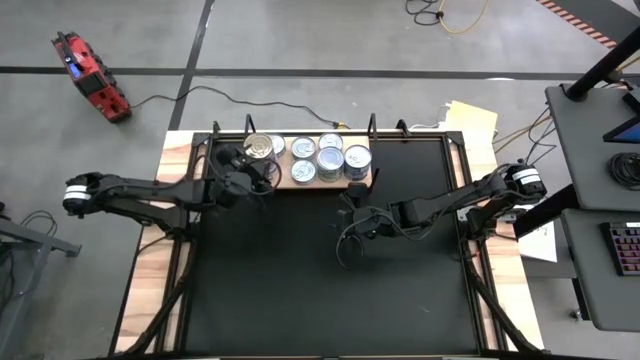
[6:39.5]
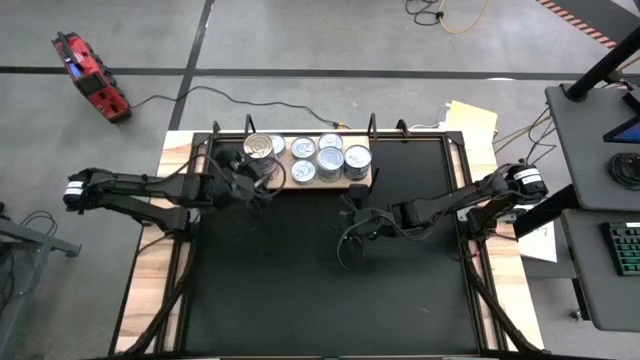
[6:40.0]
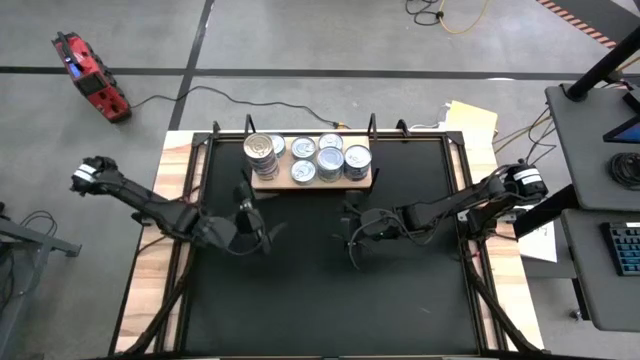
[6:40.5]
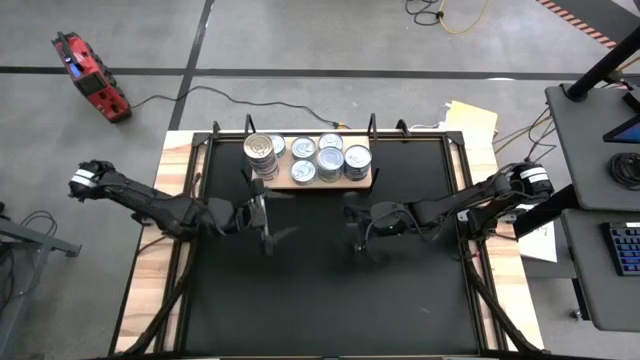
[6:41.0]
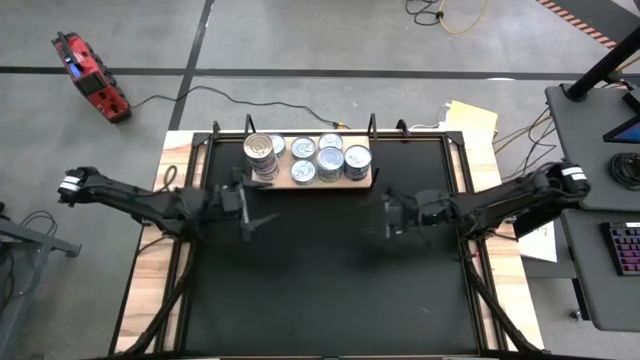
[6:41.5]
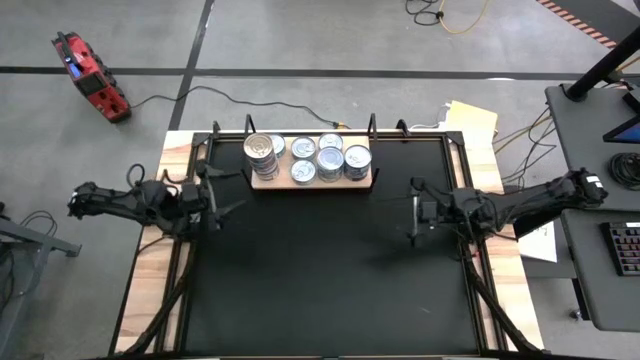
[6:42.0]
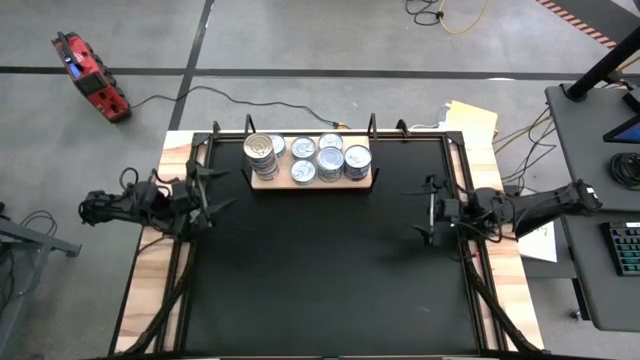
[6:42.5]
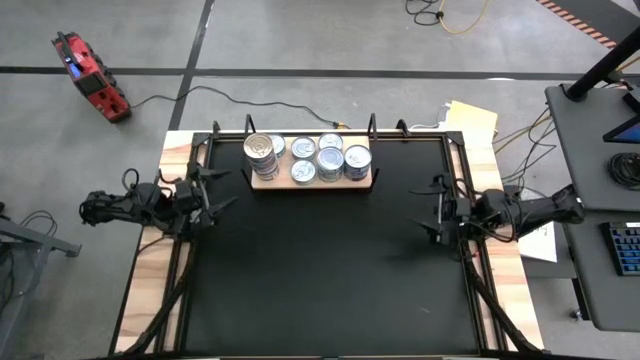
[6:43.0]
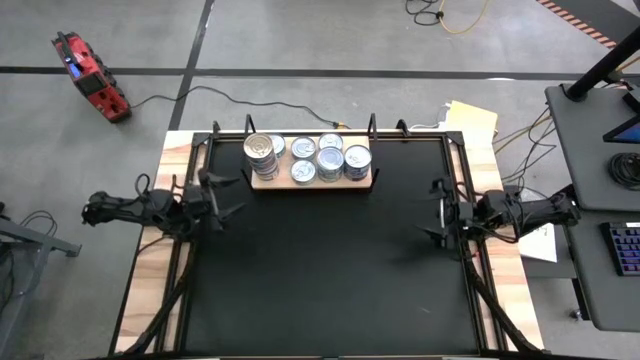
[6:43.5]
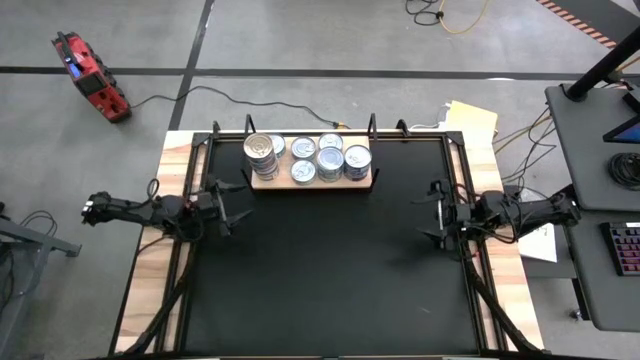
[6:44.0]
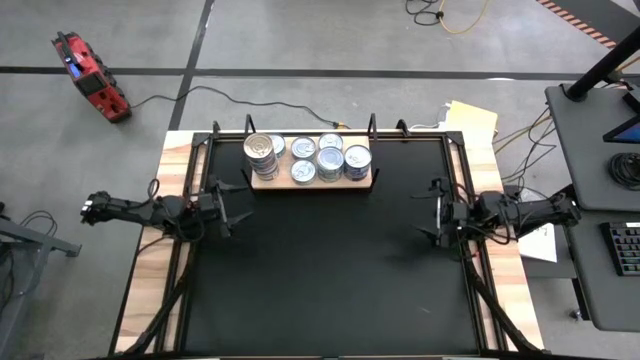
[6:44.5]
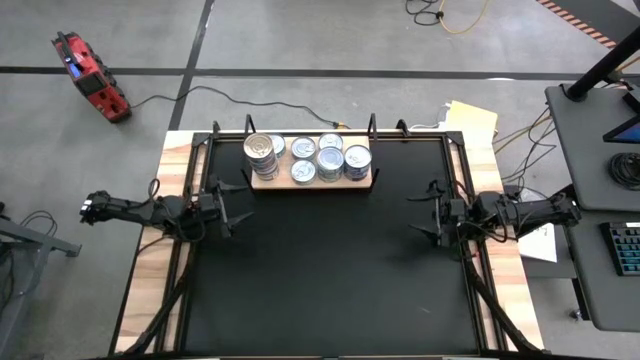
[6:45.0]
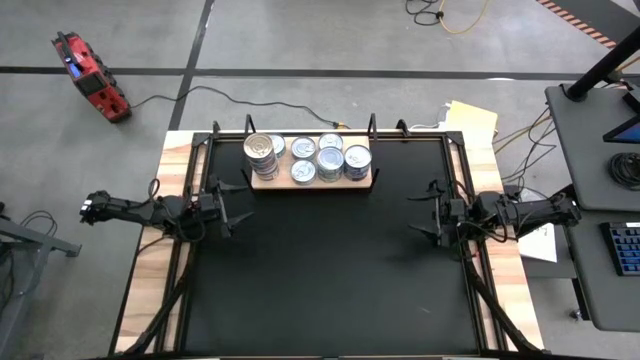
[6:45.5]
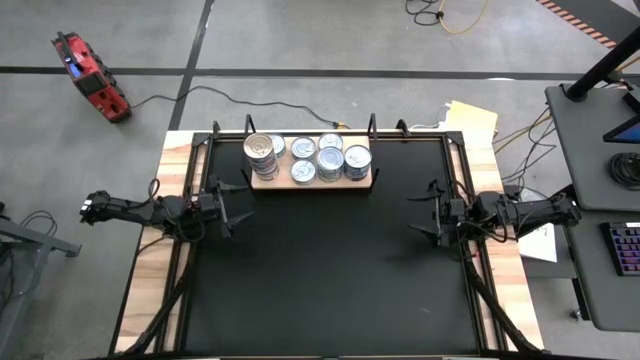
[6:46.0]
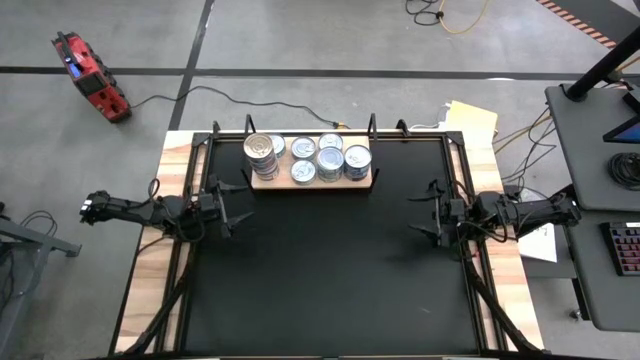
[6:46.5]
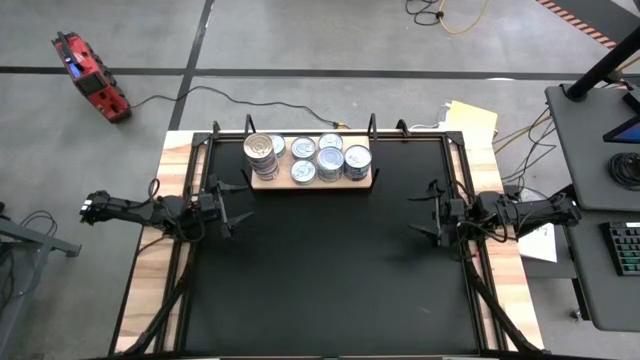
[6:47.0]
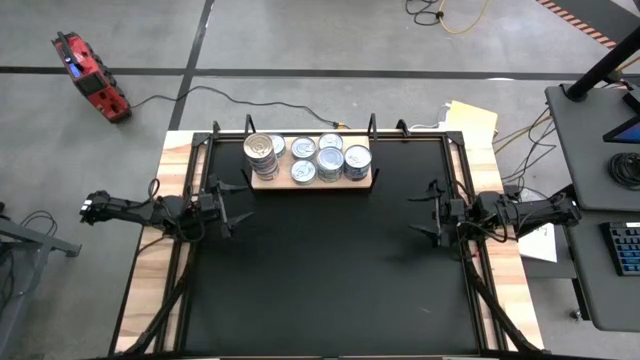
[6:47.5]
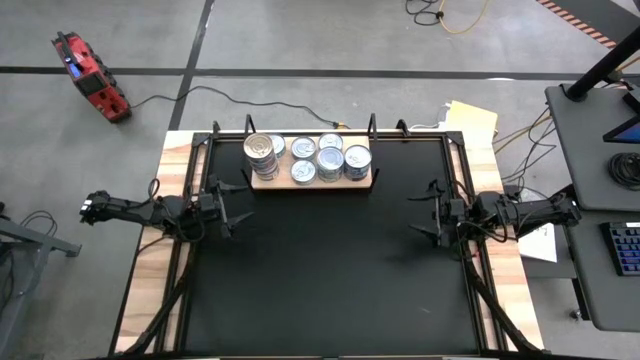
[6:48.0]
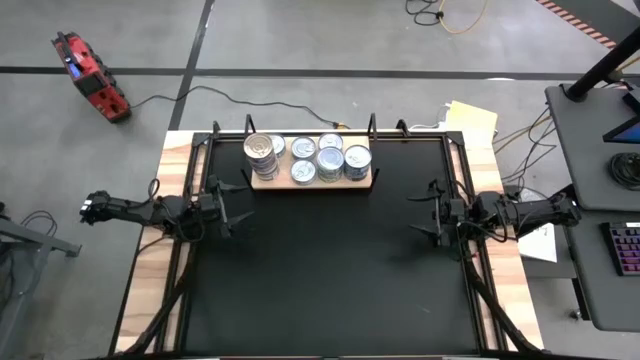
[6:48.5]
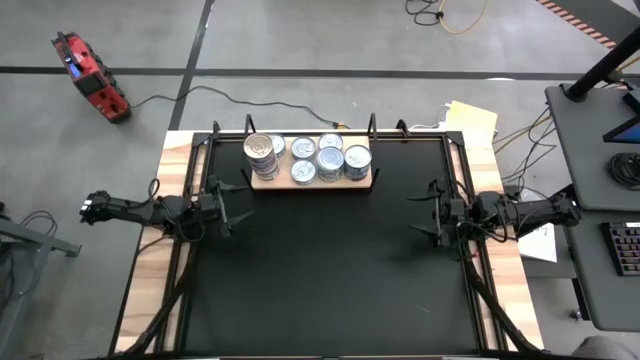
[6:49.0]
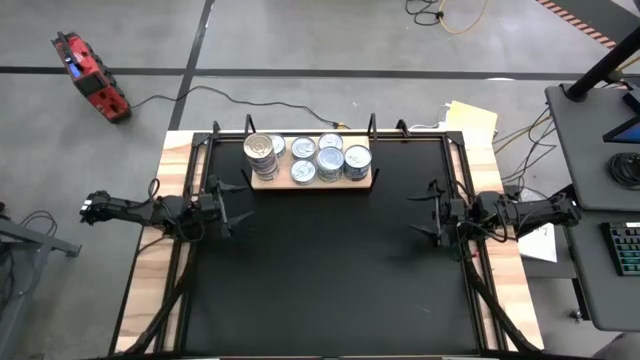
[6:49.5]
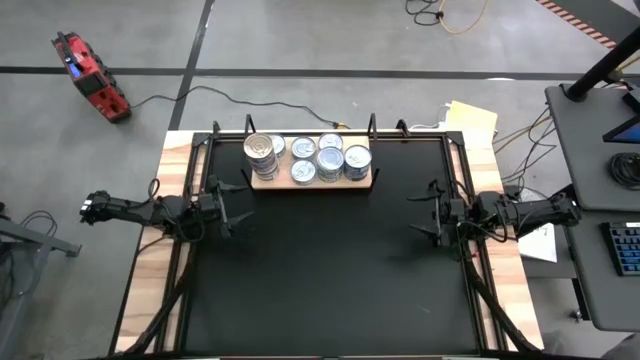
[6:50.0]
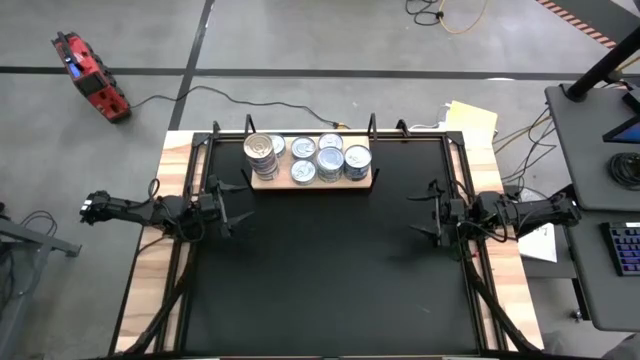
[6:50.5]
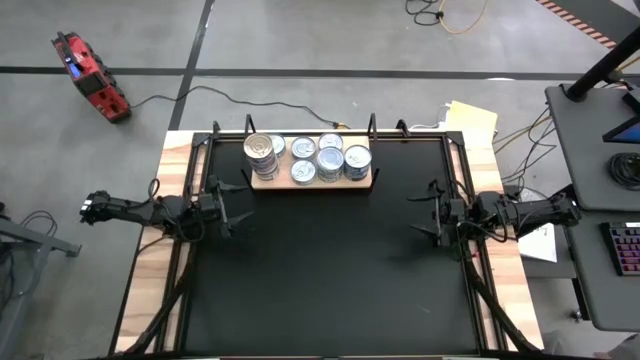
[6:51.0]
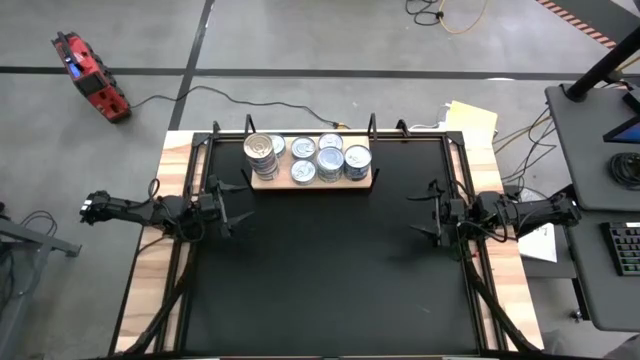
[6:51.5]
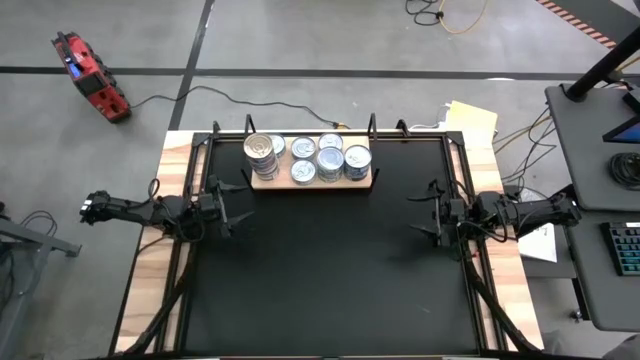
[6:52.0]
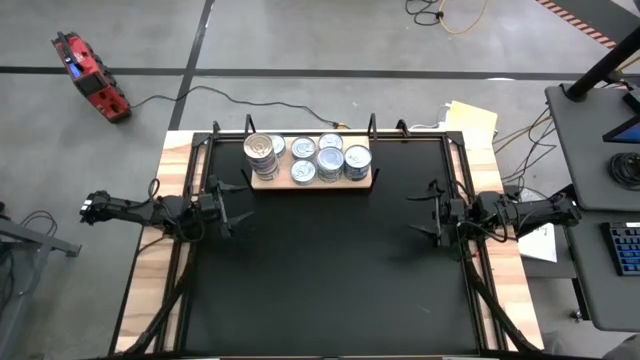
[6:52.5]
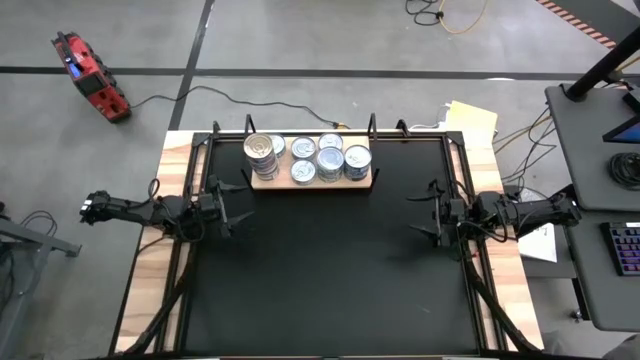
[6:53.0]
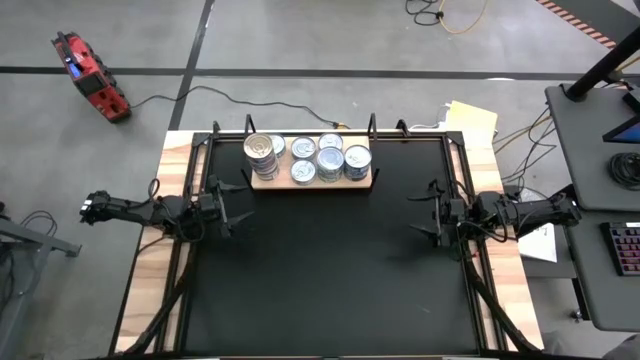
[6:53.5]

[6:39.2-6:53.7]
Task: Stack canned seafood by type on shelf
Return to Home Position

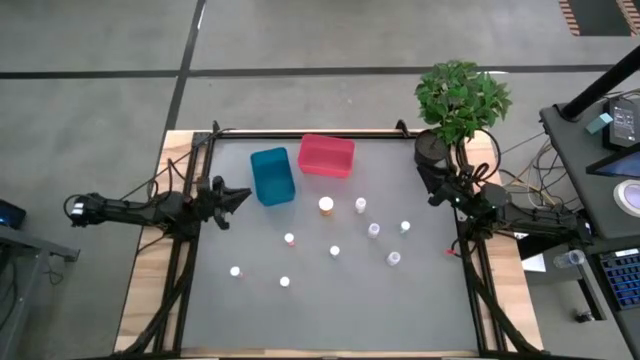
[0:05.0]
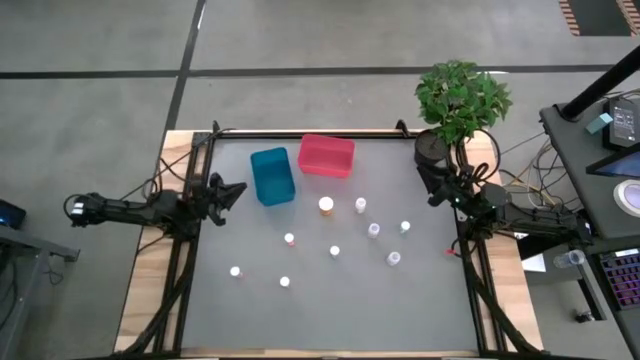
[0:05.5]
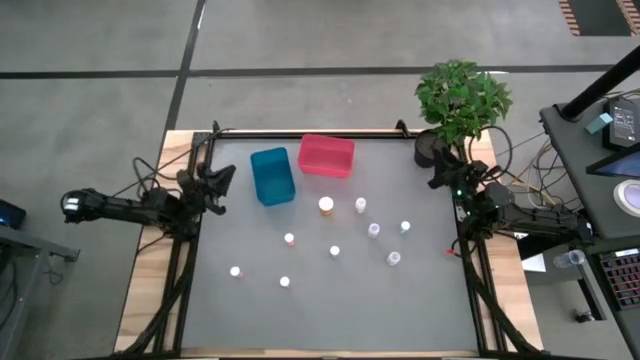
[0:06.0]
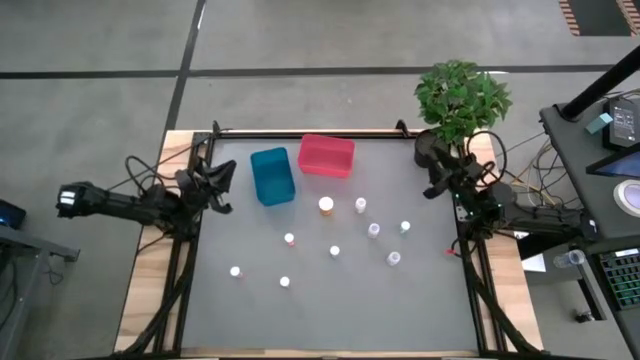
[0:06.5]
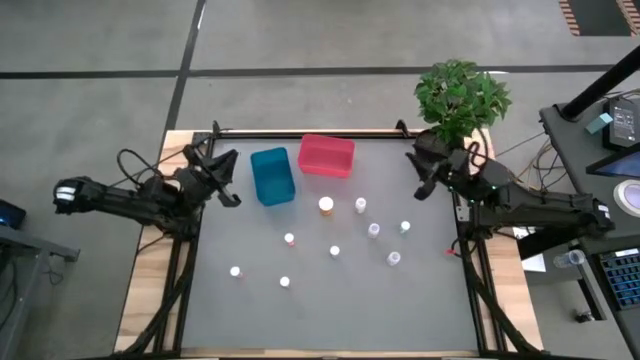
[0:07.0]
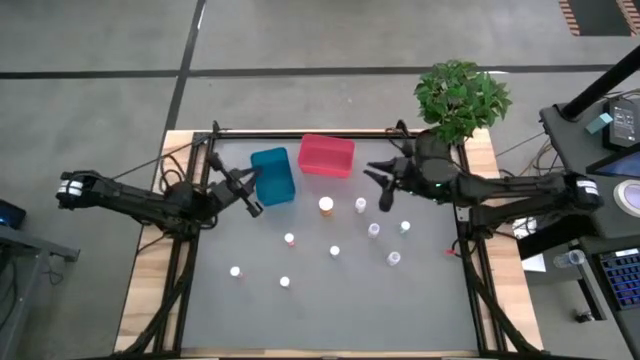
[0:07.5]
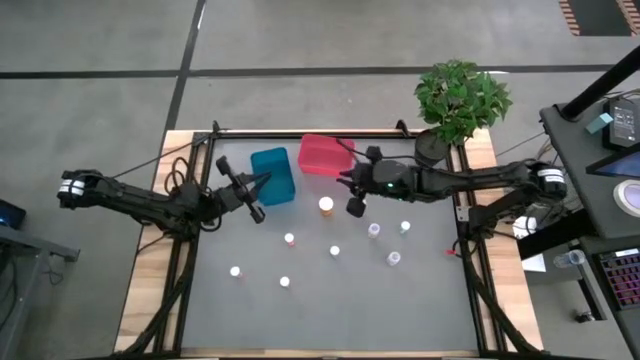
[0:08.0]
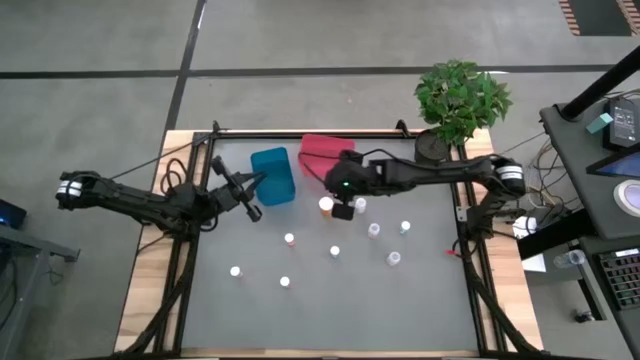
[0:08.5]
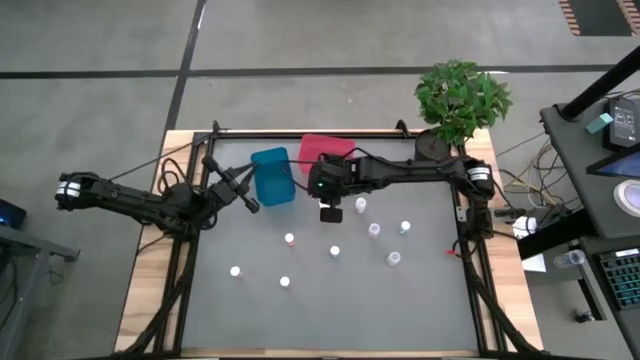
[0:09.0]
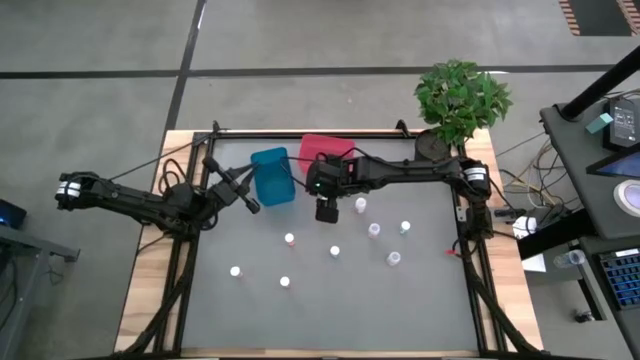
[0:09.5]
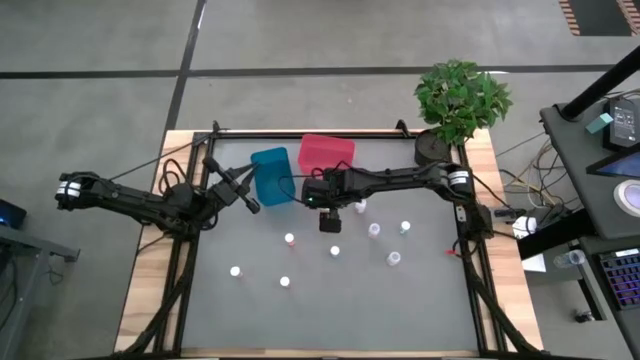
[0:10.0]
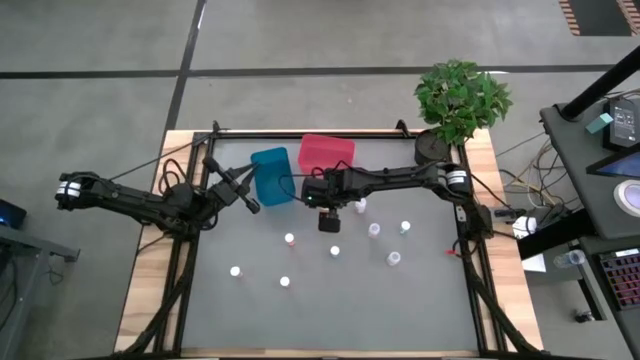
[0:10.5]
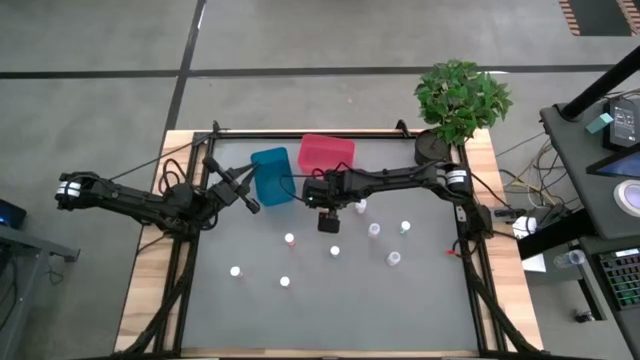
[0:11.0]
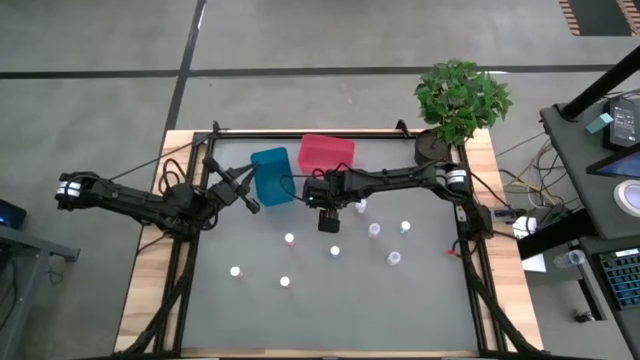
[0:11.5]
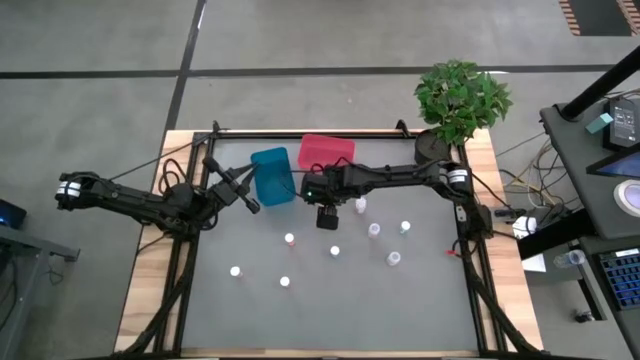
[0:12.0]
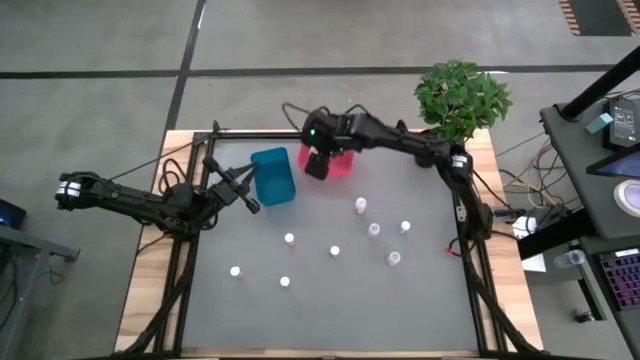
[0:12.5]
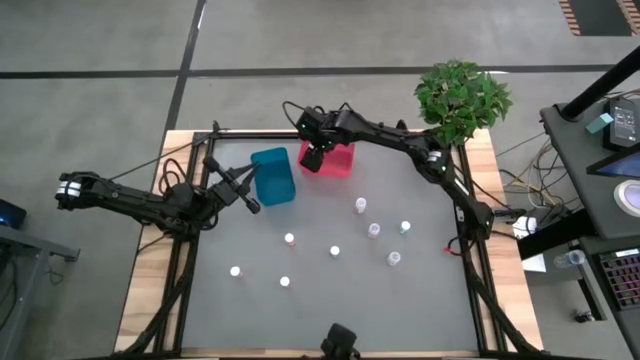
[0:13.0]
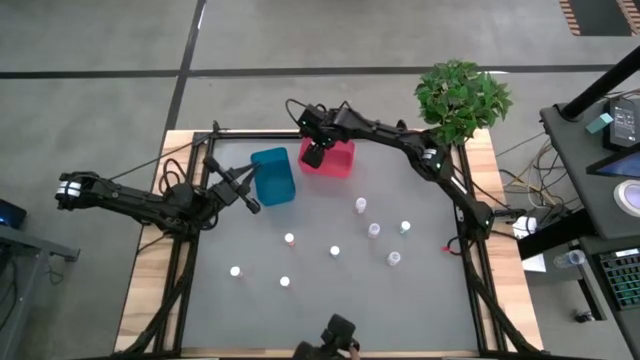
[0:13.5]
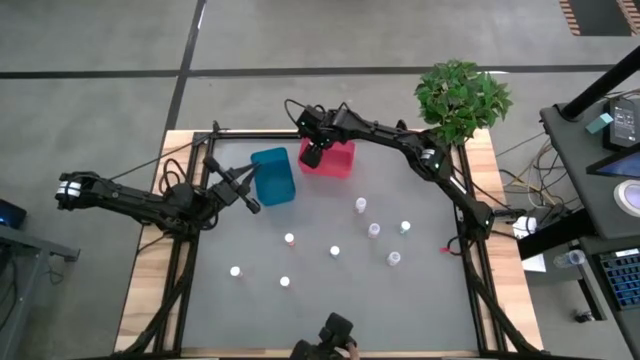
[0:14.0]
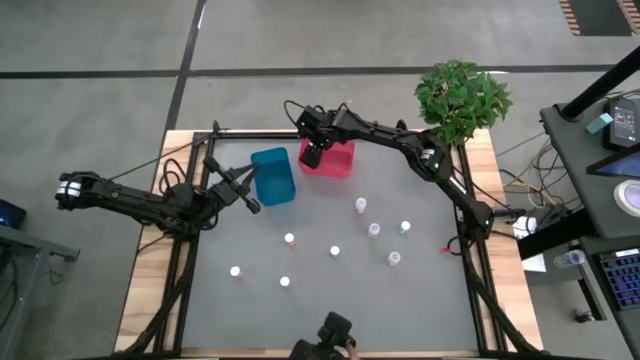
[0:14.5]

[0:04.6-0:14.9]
Task: Pick and place medicine bottles into bin by pill shape (circle, oval)
Put the orange capsule bottle into the red bin
